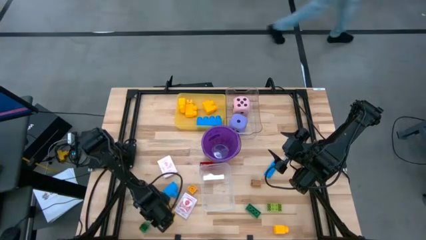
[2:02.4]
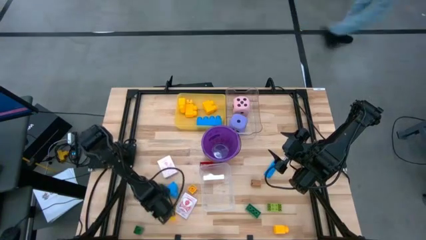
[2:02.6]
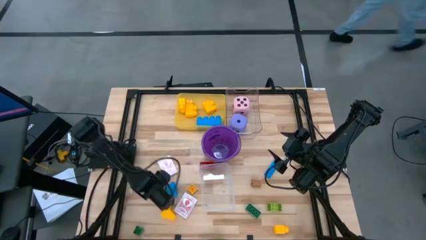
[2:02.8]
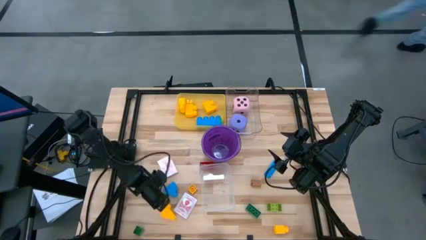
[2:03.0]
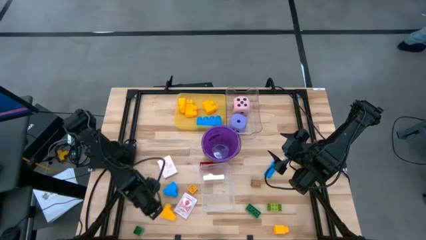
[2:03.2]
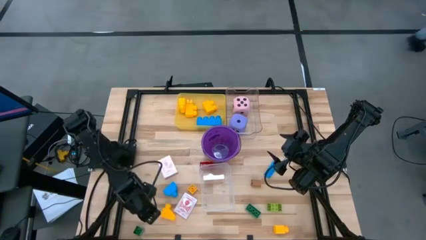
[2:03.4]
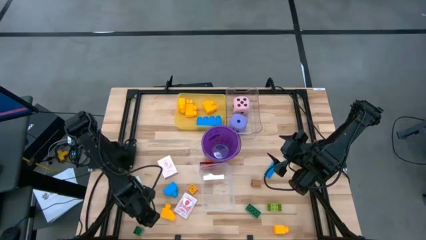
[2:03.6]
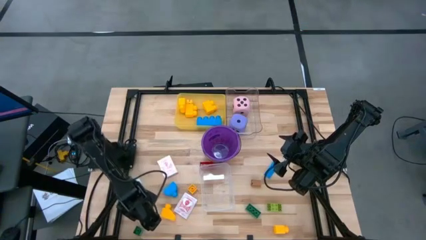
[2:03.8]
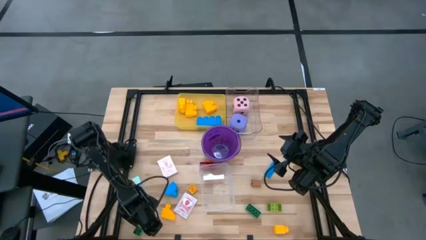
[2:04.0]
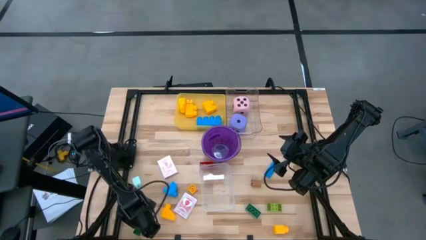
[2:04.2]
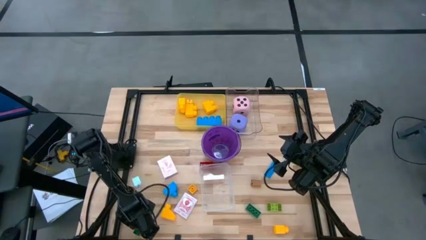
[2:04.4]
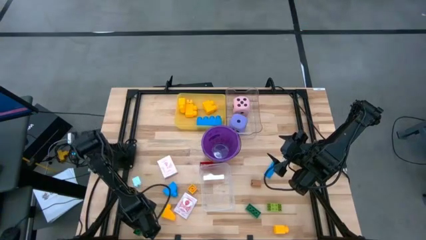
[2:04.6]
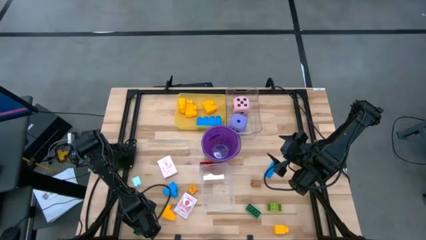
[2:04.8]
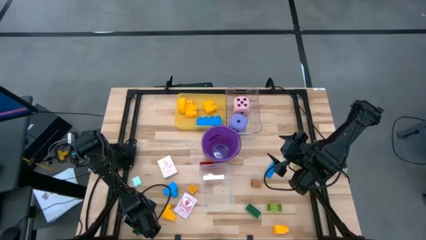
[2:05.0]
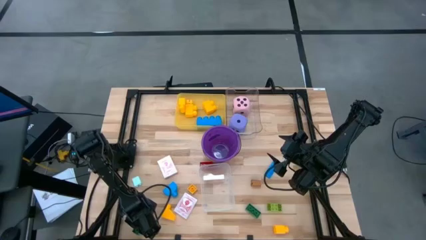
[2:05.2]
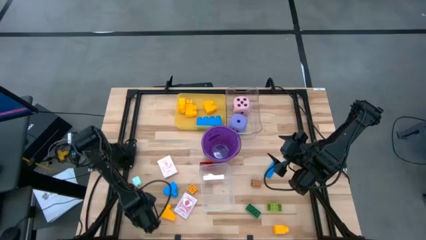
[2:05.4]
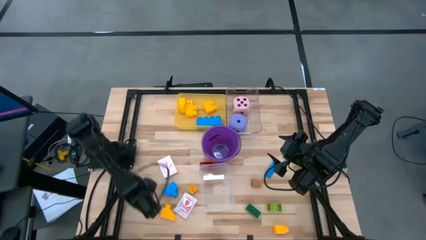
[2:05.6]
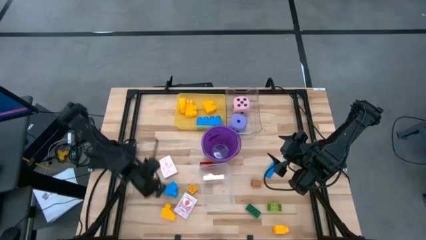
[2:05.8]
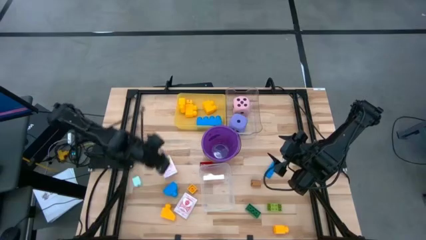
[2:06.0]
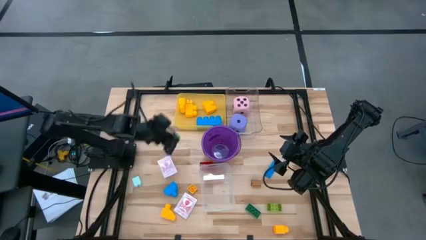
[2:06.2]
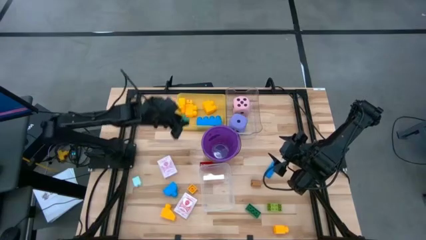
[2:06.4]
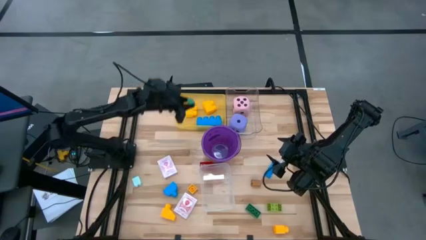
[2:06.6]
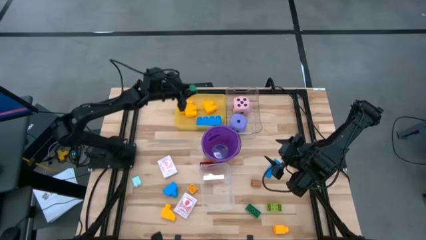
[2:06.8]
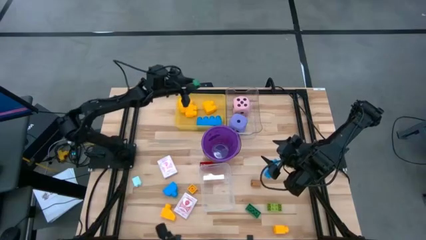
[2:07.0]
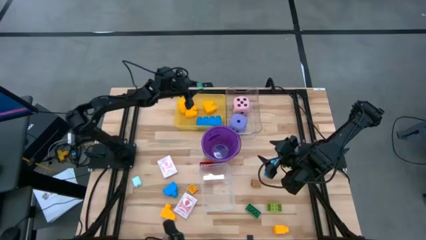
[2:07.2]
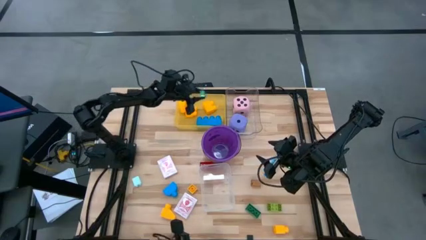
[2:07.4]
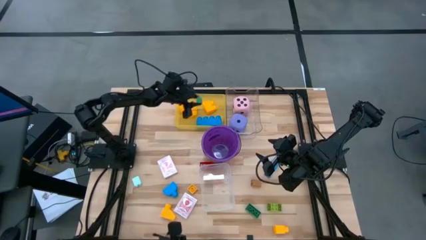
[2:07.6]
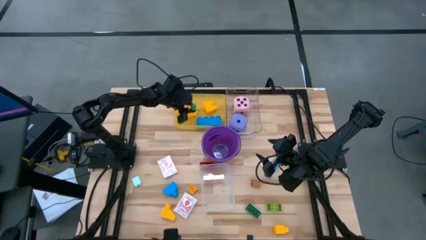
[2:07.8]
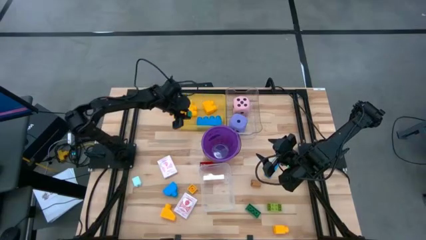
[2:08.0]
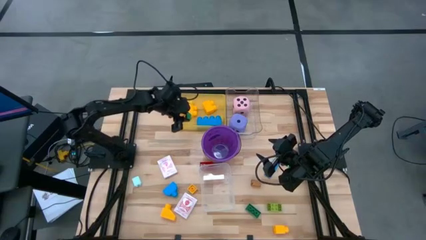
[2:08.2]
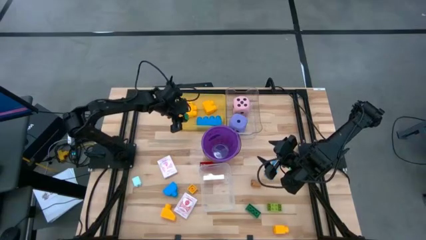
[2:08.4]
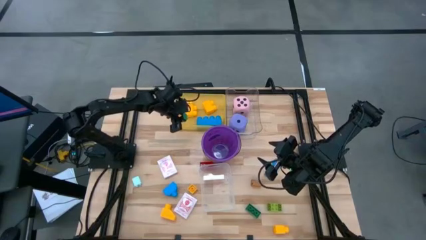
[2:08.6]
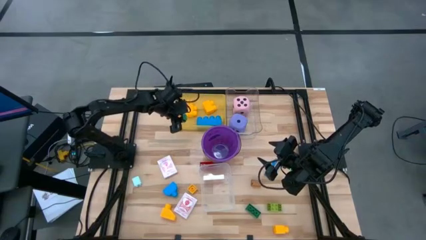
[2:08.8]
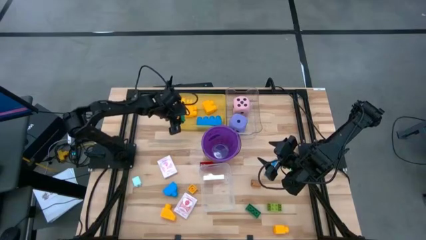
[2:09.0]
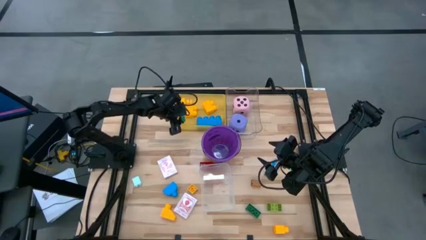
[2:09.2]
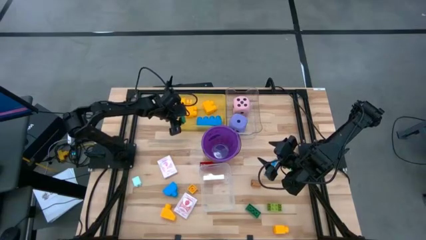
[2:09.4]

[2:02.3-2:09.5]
Task: Pick & Place Toys
Put the green game piece into the yellow bin

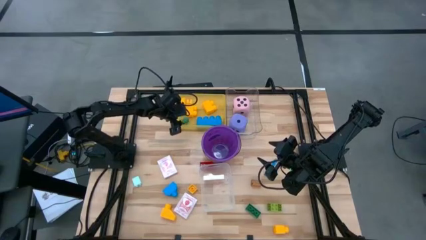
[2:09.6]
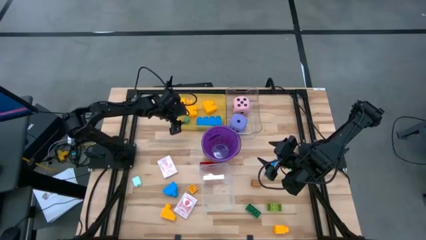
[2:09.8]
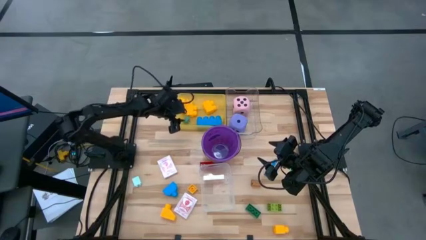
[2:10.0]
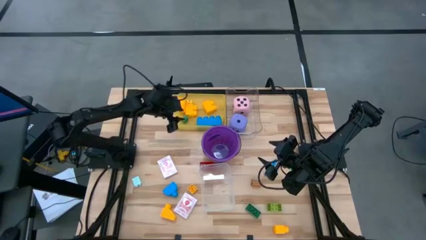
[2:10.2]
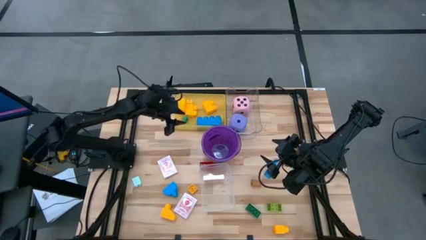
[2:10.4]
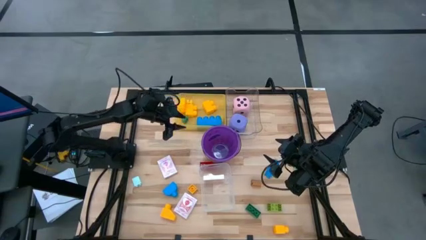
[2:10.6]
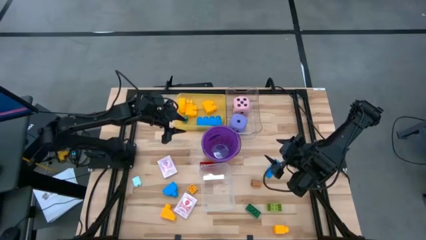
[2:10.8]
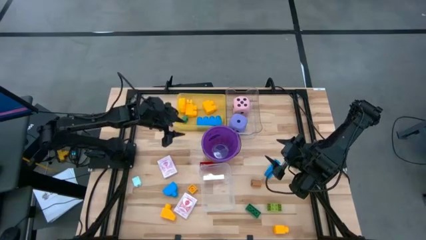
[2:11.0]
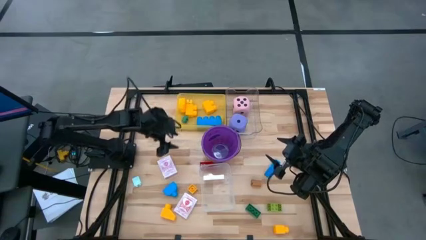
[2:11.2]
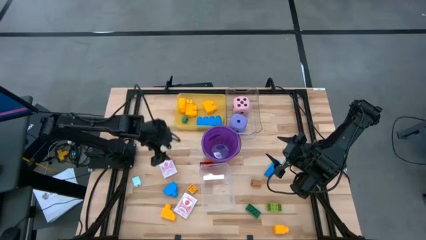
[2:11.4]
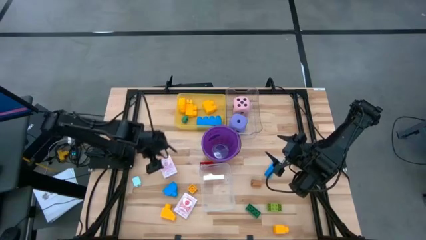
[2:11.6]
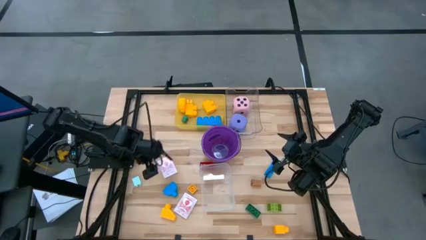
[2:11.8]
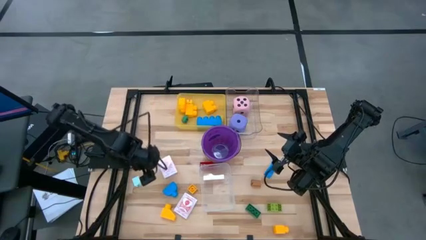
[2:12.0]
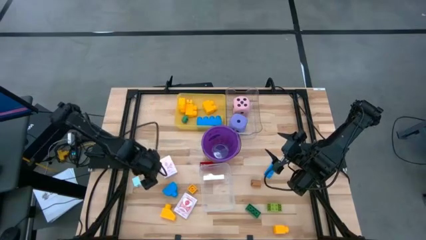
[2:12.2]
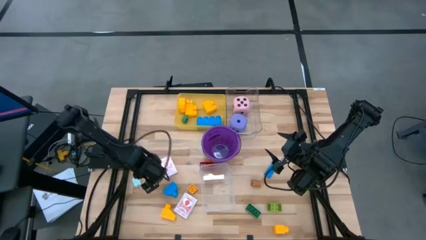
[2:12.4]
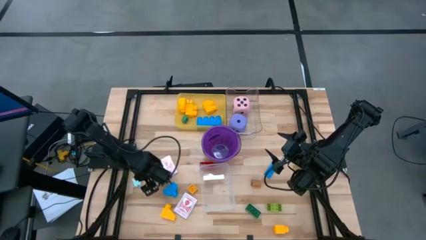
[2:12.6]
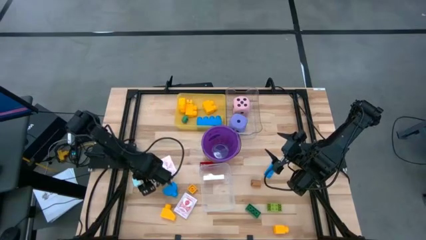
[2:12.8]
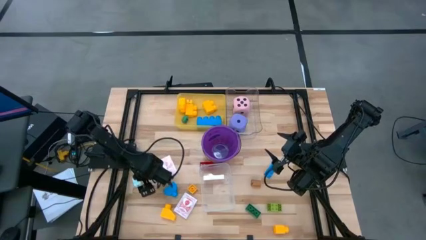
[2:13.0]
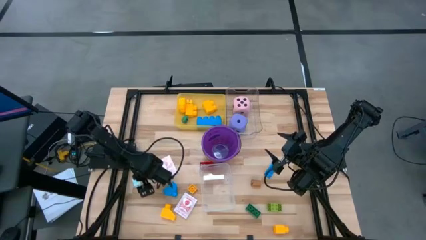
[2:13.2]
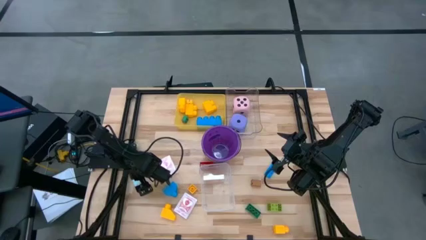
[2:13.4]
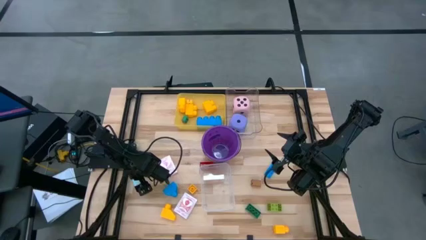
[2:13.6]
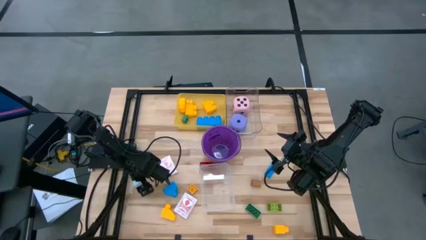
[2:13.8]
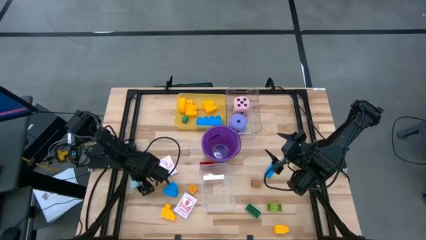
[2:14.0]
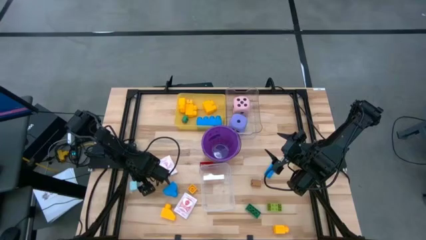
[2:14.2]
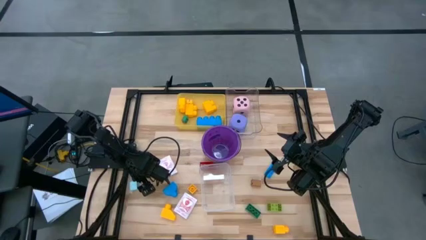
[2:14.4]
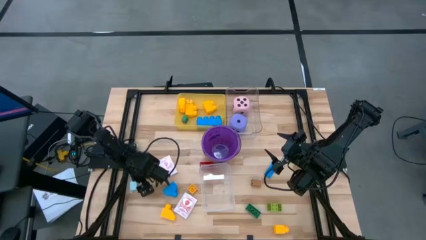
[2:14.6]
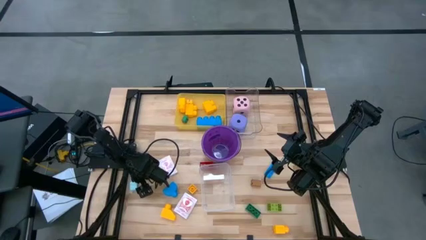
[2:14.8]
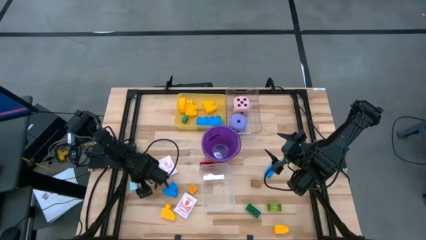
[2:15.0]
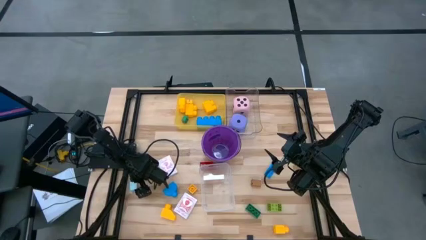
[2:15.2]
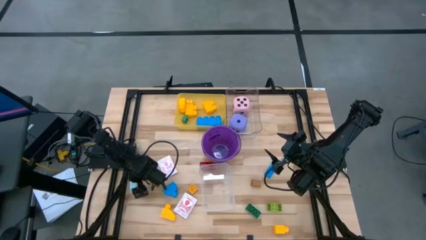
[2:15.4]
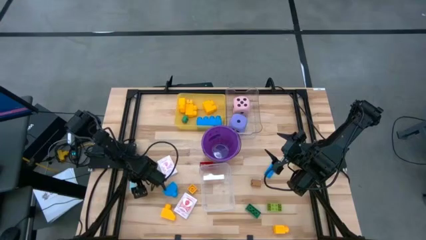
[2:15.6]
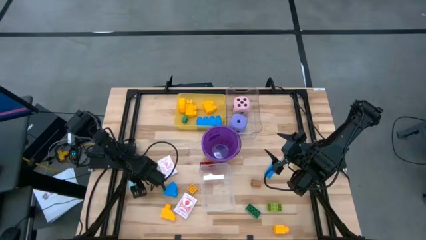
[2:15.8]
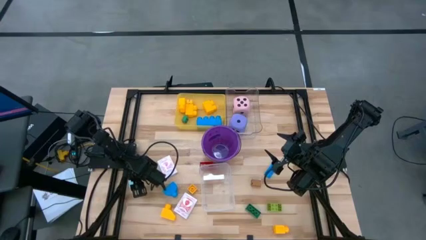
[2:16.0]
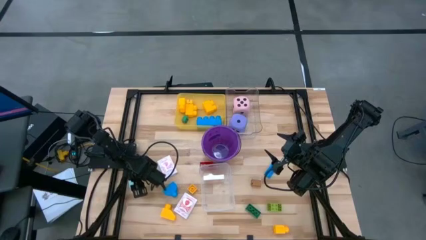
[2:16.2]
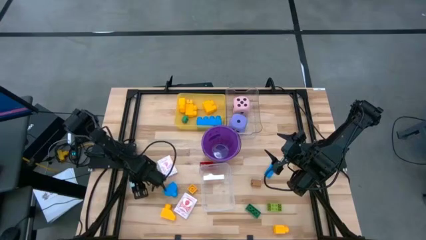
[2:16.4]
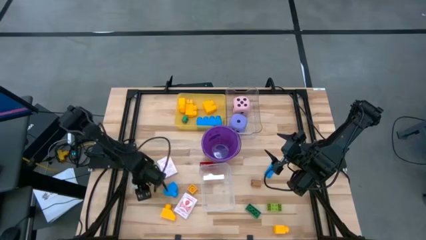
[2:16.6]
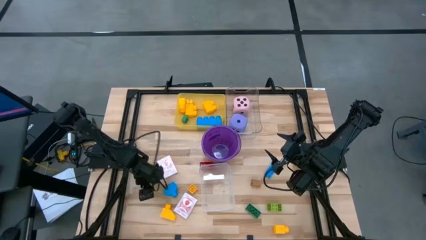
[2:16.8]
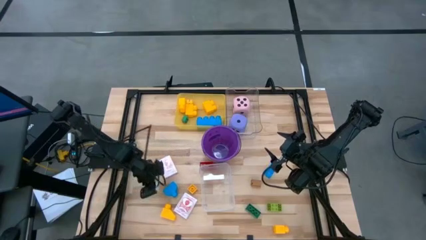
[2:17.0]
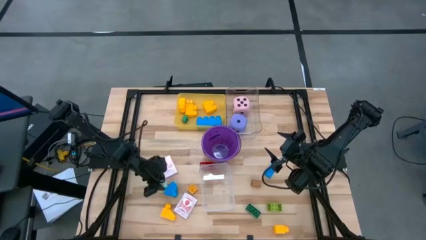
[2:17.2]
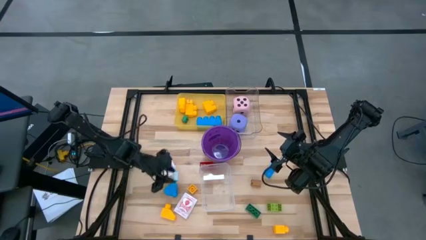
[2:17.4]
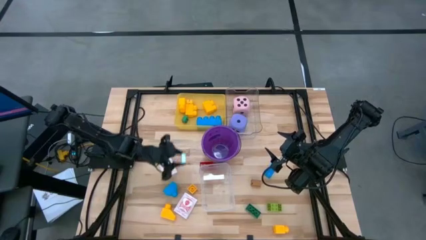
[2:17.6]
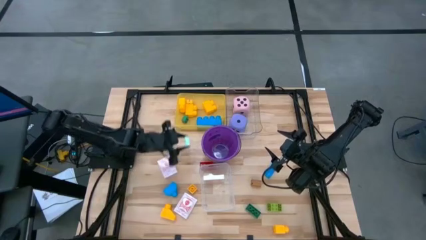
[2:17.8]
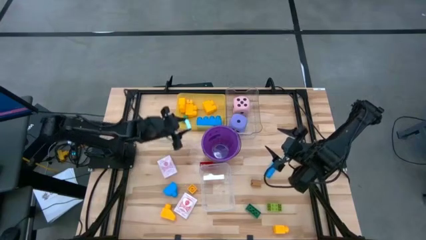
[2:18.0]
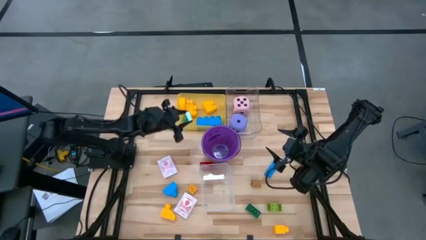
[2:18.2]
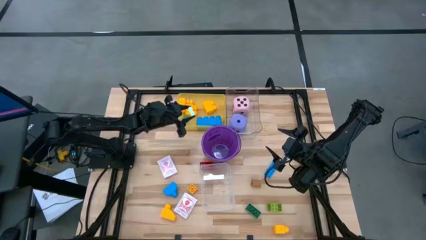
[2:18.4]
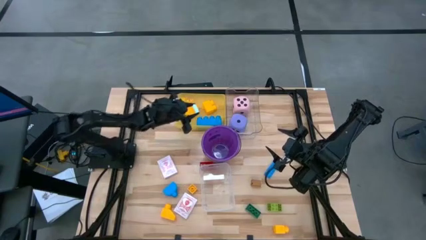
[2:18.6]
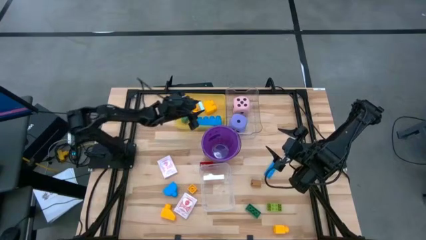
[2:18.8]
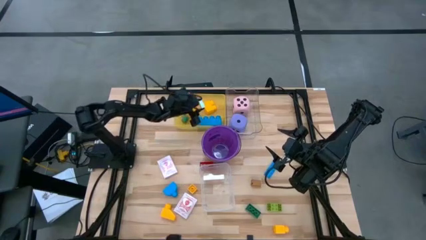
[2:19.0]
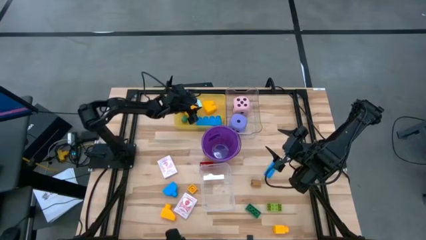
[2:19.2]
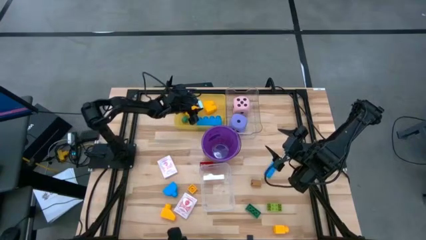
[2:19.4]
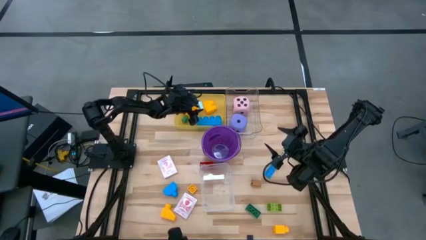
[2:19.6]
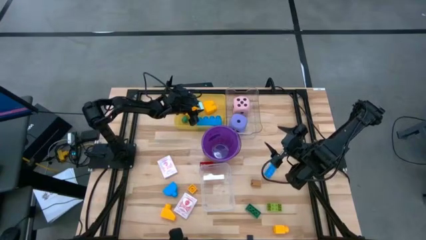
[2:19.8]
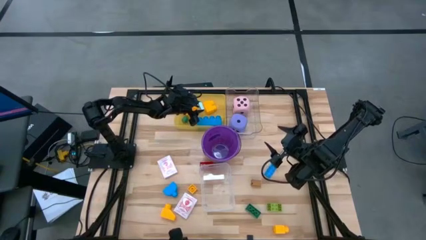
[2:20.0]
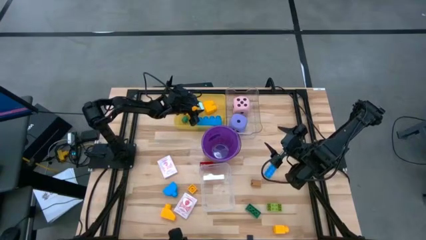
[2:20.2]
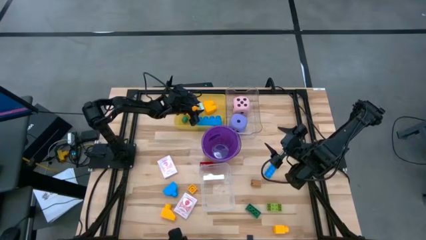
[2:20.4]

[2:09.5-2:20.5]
Put the light blue game piece into the yellow bin
